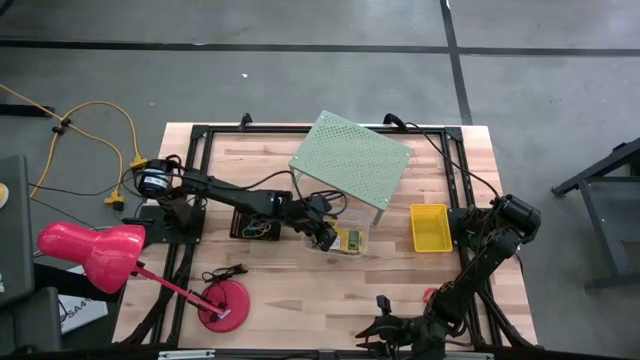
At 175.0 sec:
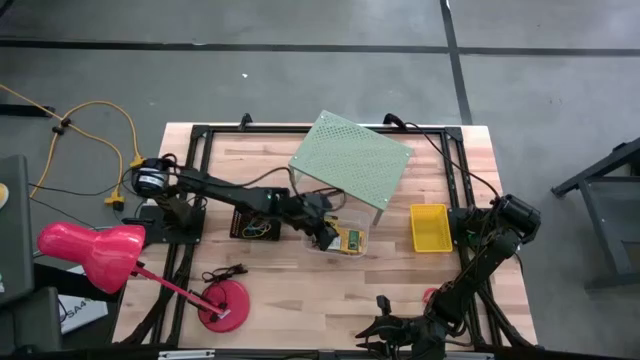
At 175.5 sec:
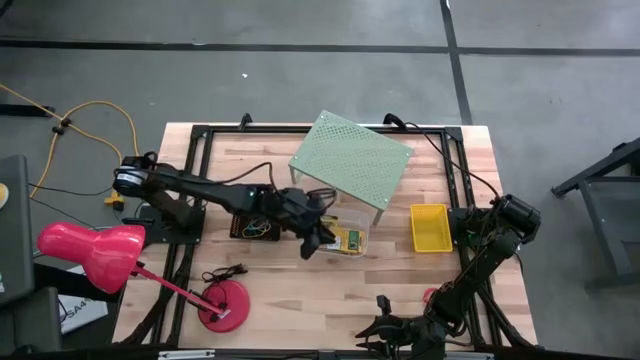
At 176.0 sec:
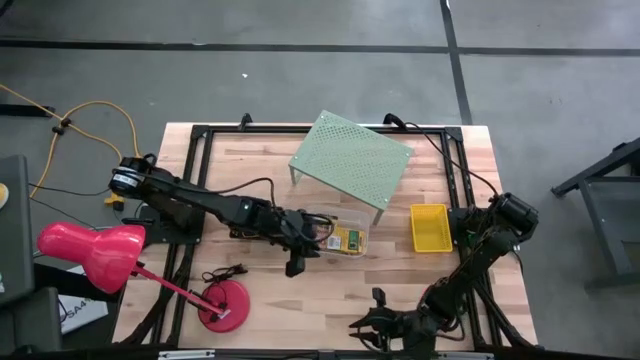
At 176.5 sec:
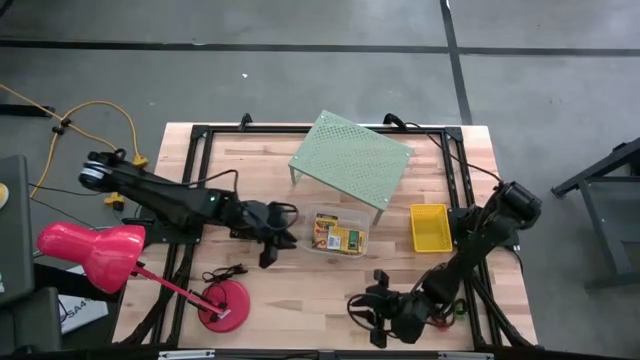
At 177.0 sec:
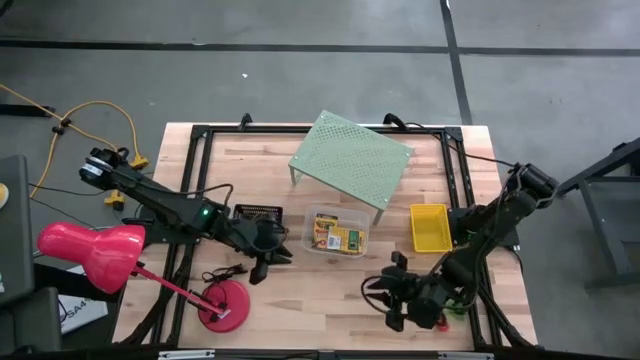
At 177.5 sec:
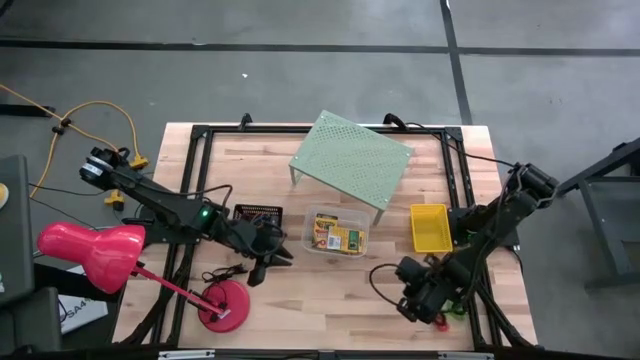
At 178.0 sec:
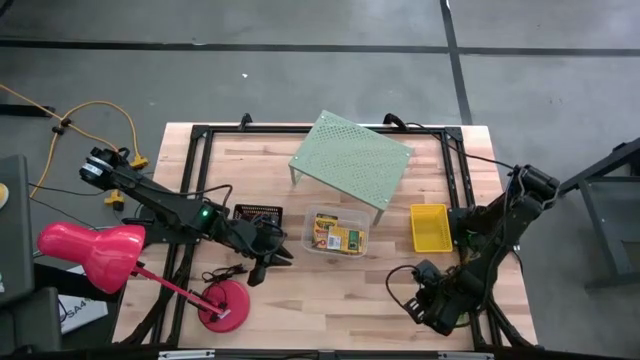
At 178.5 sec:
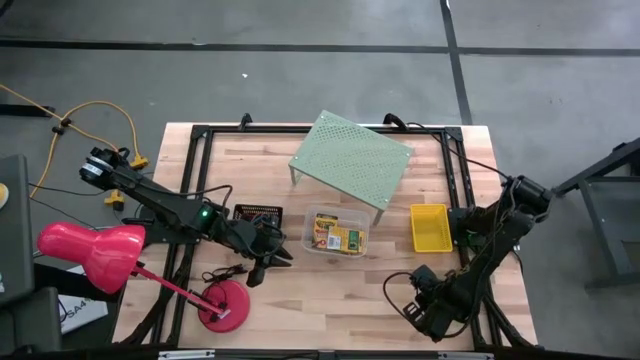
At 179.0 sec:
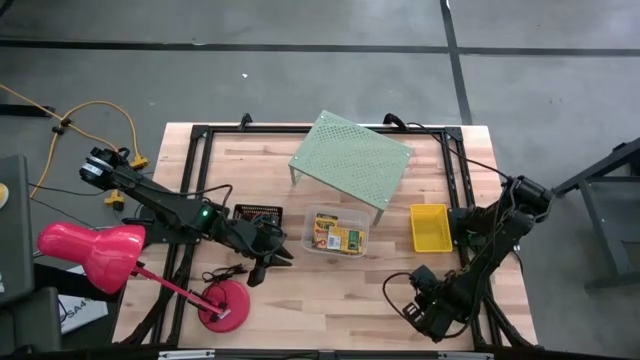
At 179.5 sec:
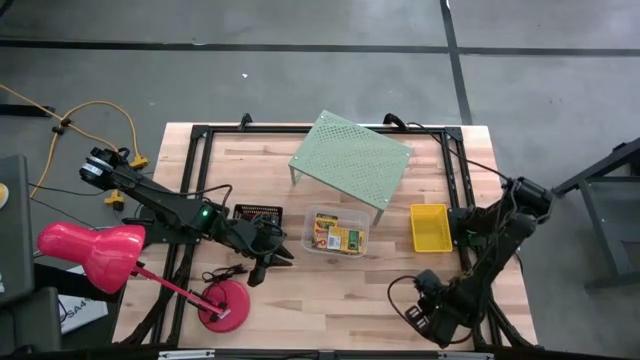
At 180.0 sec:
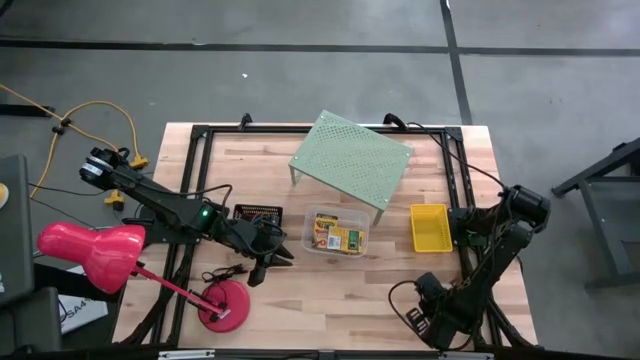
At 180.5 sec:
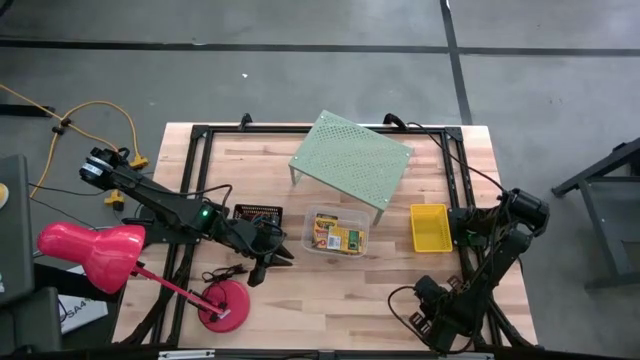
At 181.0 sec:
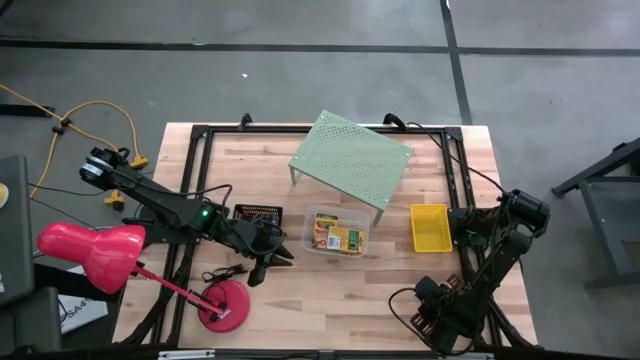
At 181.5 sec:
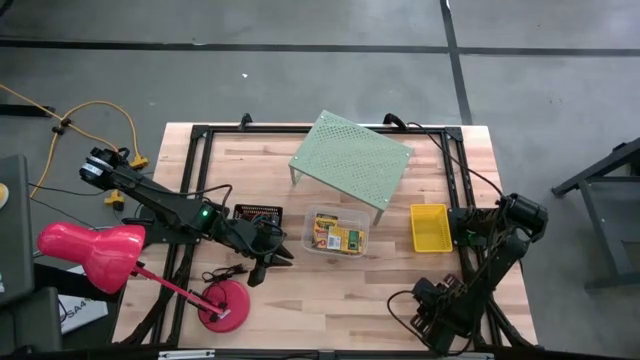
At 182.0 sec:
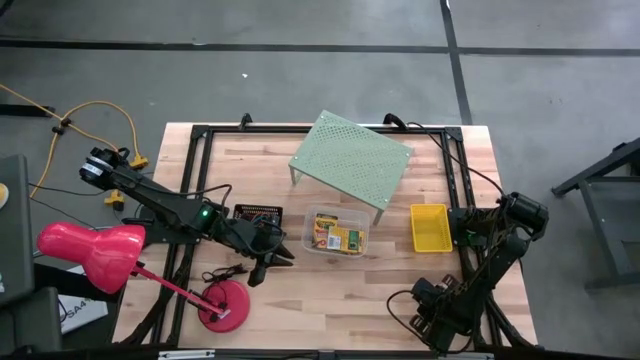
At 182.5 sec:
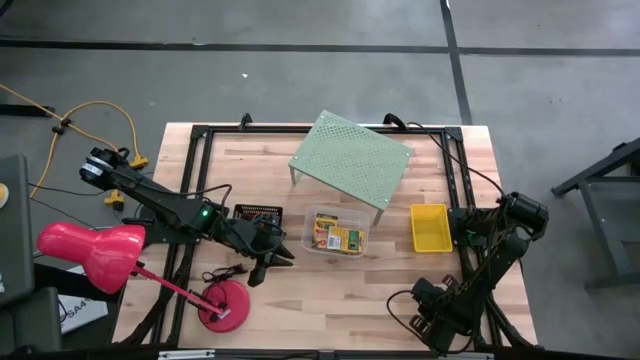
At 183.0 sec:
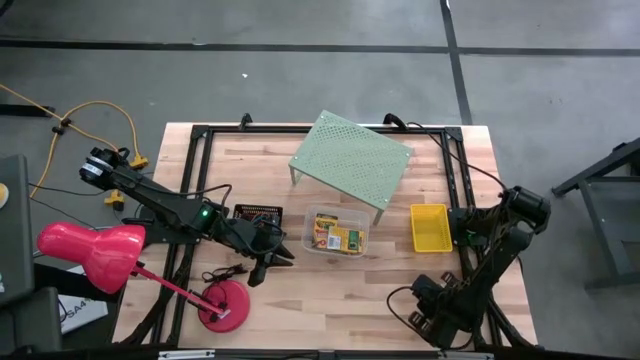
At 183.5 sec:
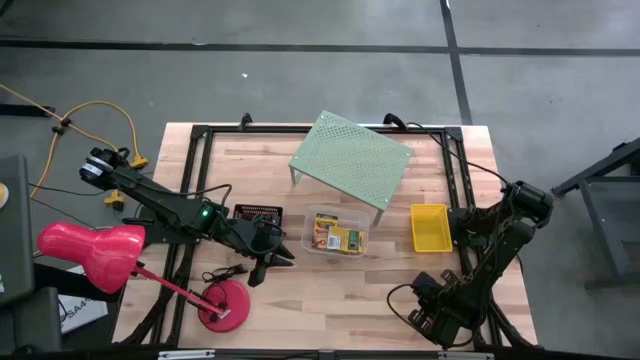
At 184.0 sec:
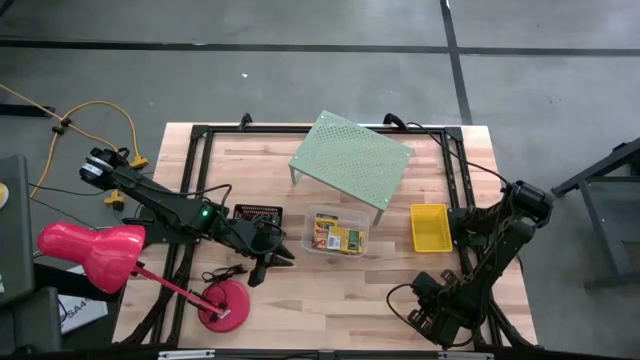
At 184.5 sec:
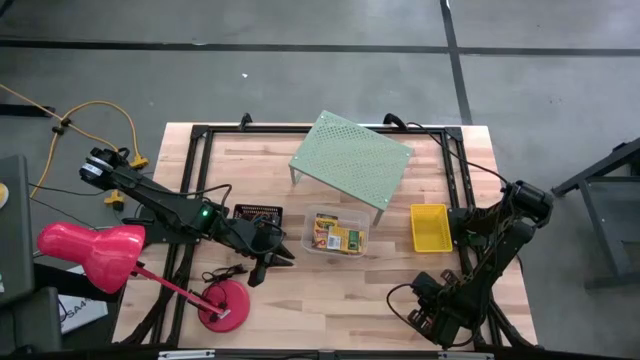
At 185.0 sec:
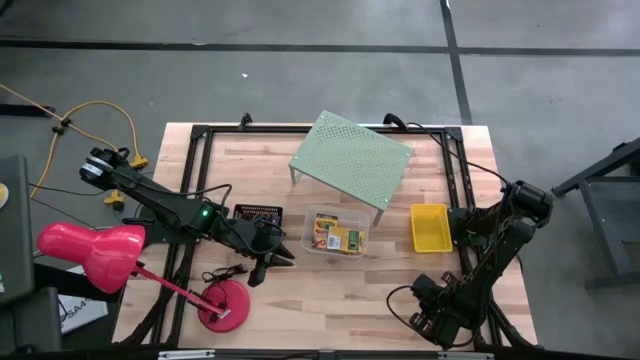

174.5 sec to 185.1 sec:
Task: Pick & Place Office Desk Supplies
Put the top red spring keychain into the yellow bin

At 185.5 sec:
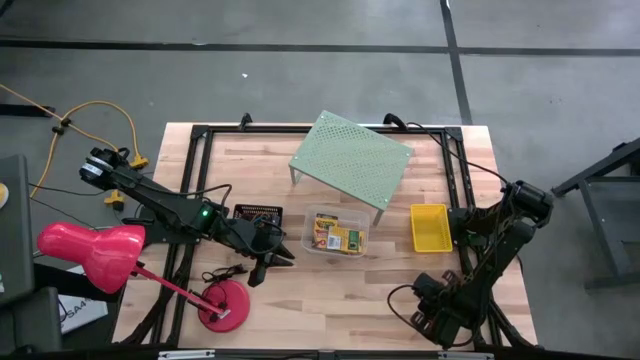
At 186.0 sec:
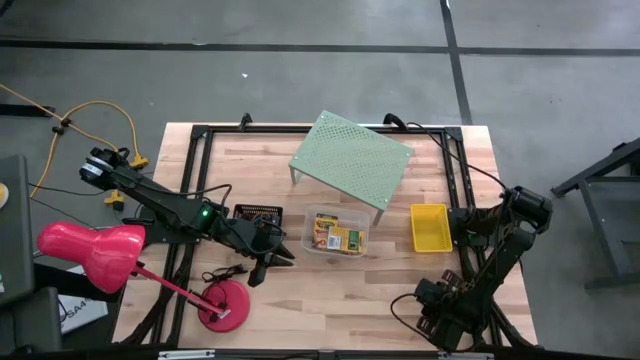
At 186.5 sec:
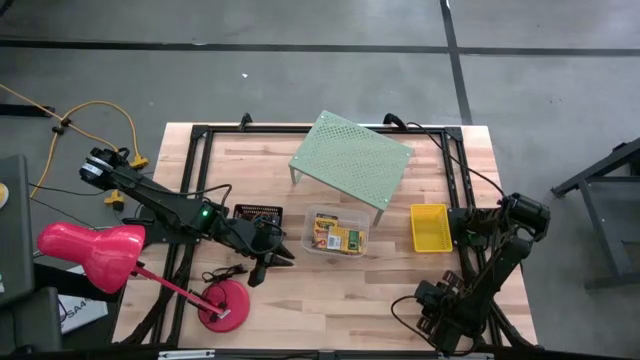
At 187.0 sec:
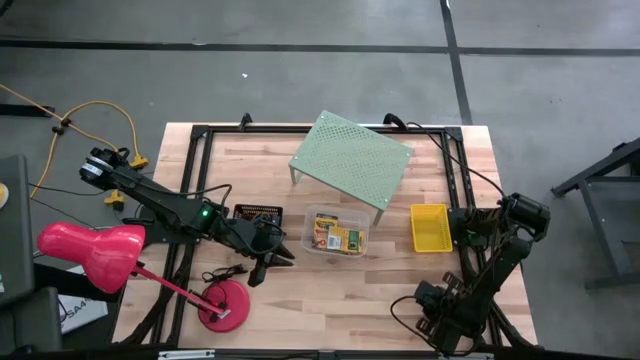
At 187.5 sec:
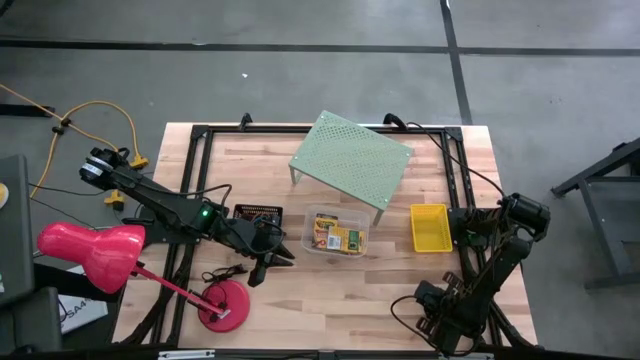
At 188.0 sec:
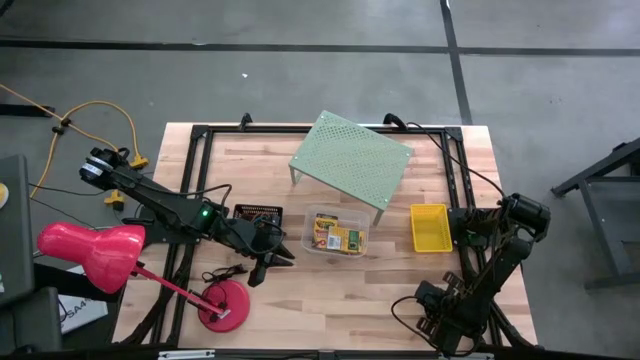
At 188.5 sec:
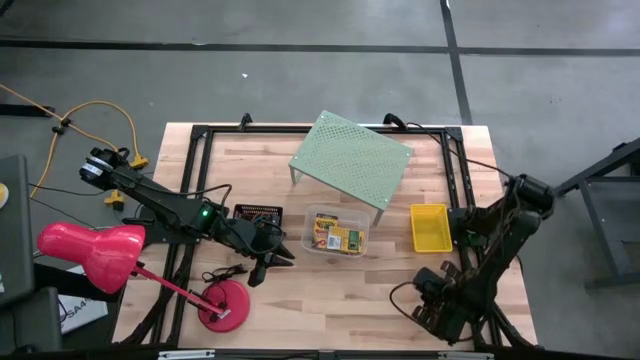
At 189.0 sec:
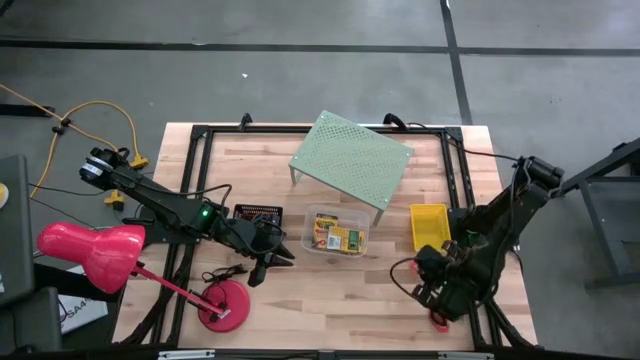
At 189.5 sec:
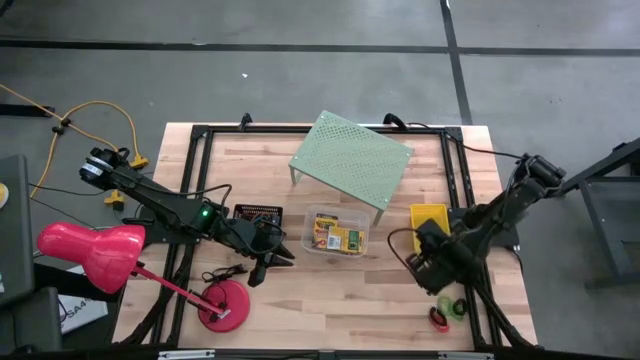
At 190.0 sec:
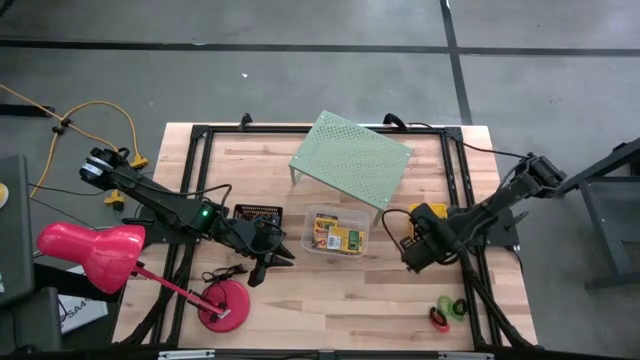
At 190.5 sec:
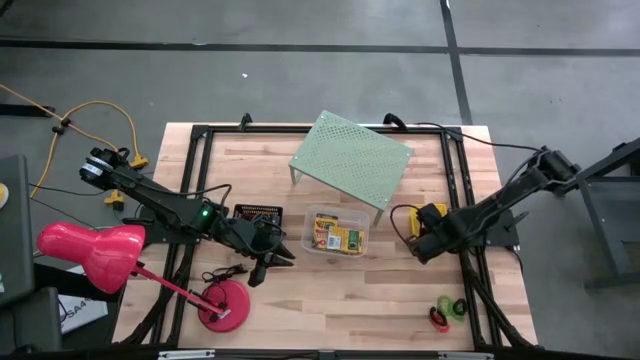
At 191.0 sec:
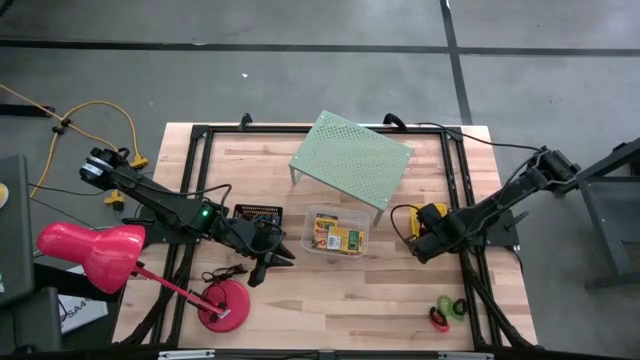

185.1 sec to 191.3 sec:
Put the top red spring keychain into the yellow bin

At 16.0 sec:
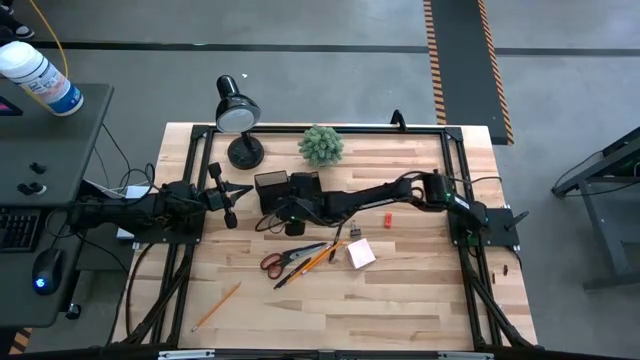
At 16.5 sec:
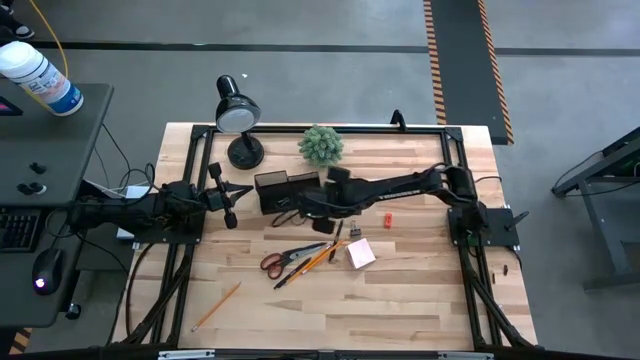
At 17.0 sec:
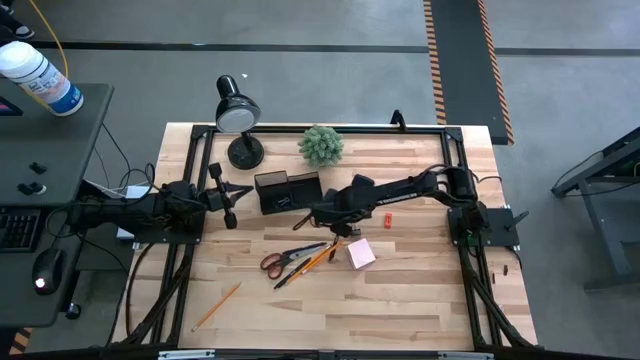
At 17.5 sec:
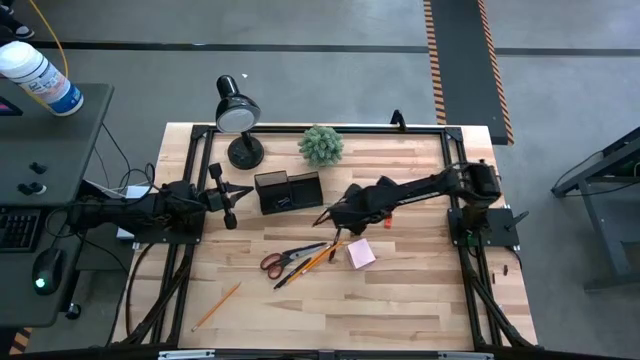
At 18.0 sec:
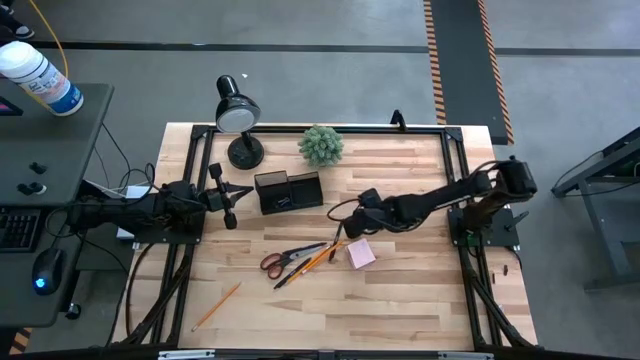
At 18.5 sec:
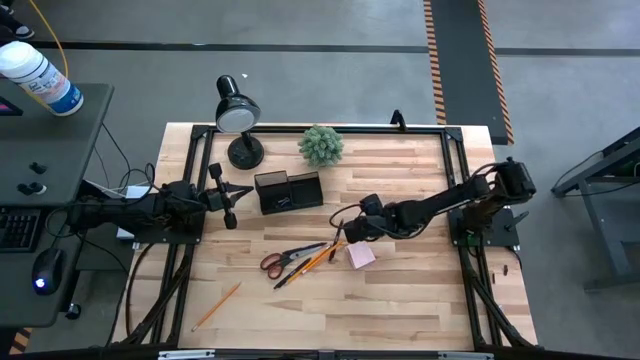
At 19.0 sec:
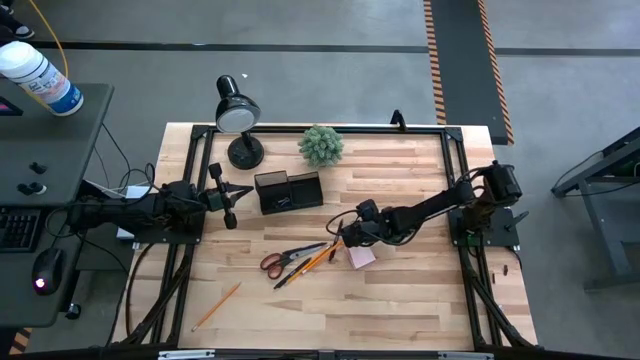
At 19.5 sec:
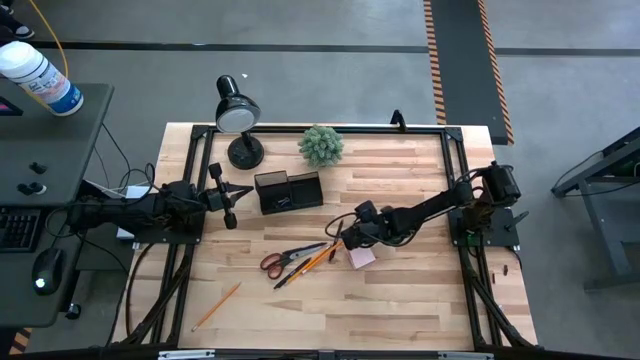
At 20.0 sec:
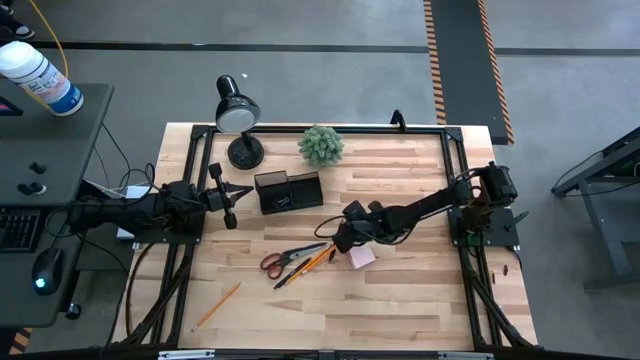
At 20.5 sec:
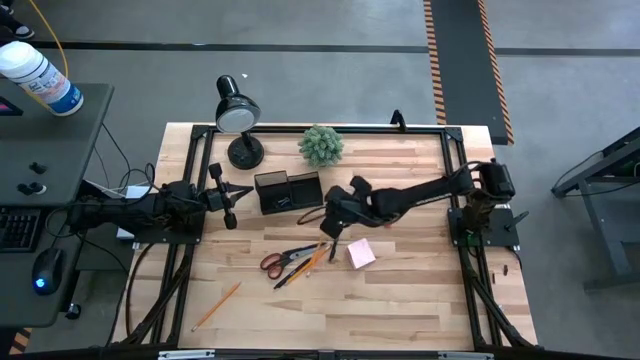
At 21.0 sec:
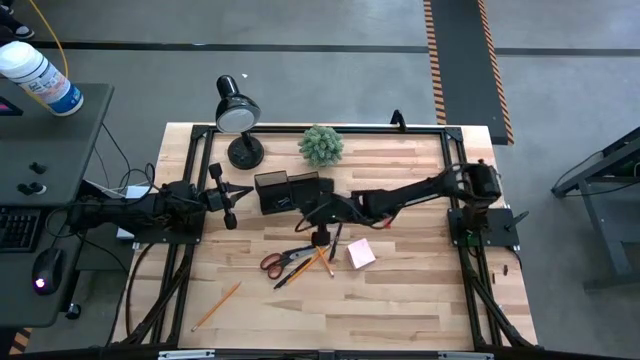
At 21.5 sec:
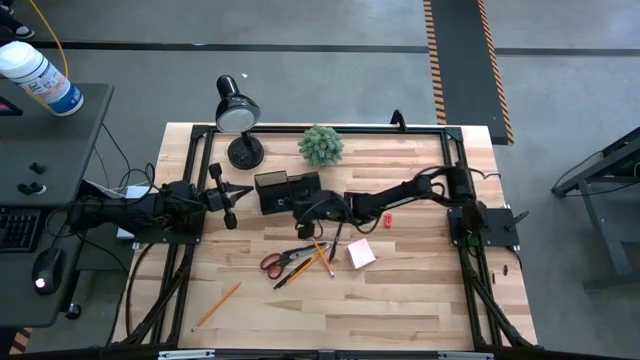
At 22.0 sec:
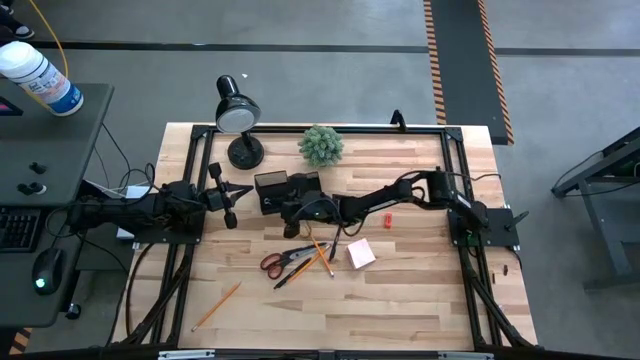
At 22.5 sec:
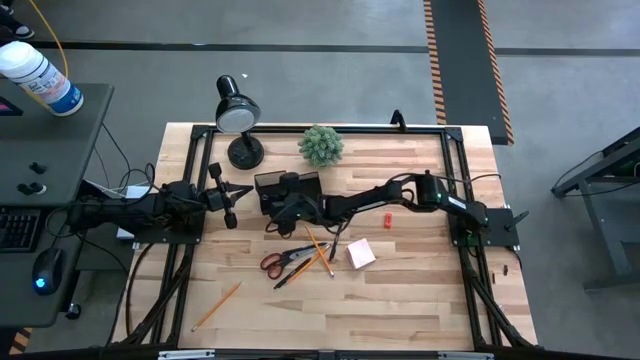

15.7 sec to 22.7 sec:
Task: Pick and place office supplies into organizer
Put the clip binder into the black organizer
